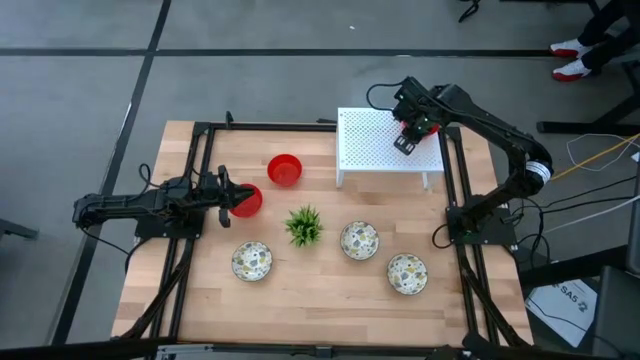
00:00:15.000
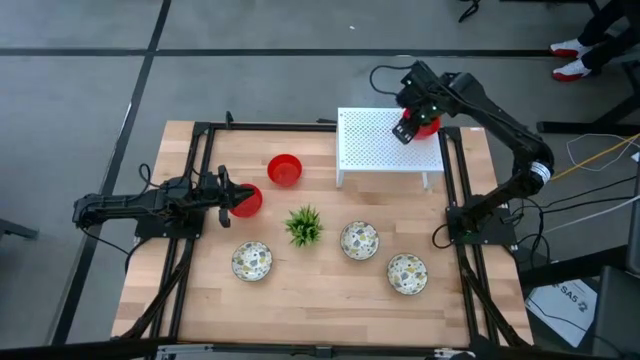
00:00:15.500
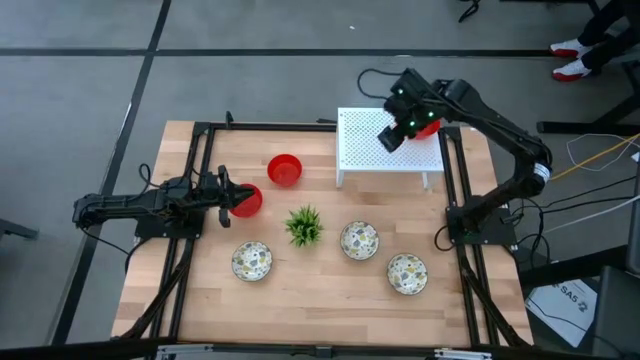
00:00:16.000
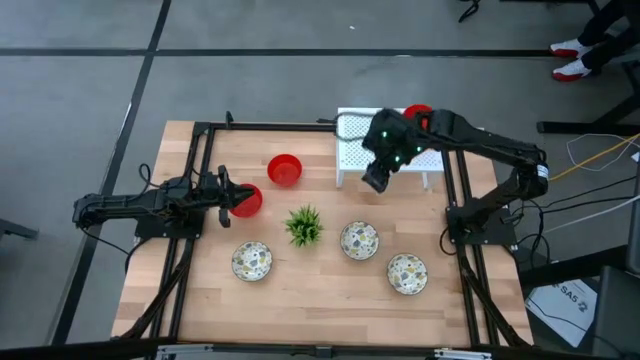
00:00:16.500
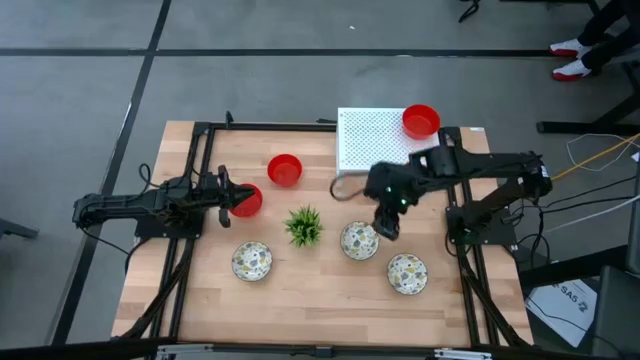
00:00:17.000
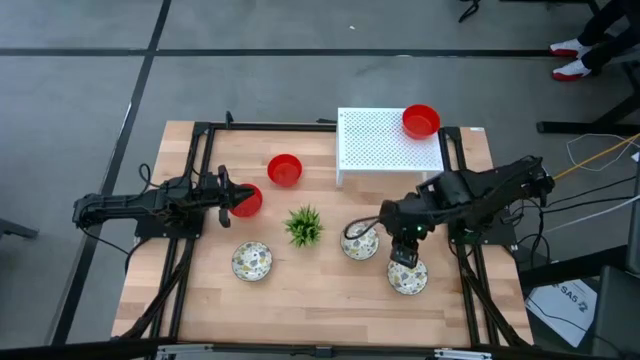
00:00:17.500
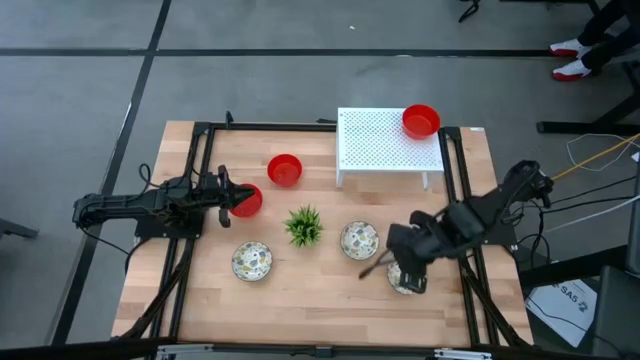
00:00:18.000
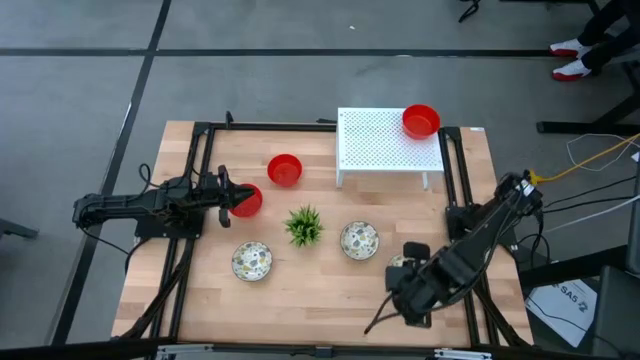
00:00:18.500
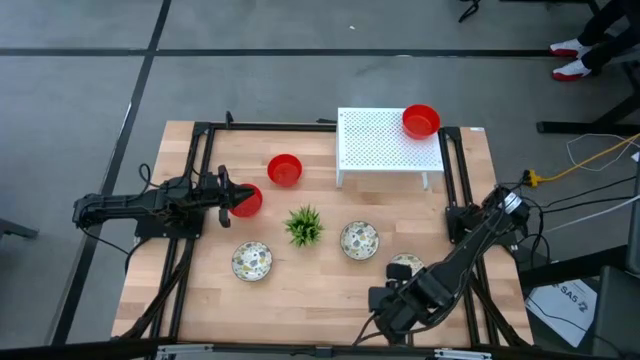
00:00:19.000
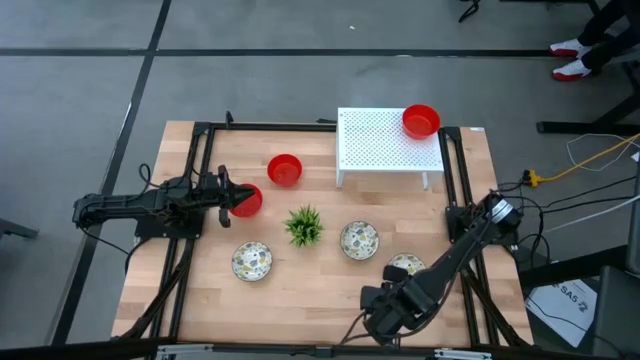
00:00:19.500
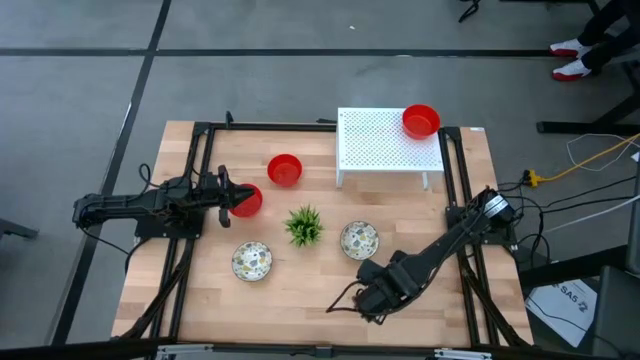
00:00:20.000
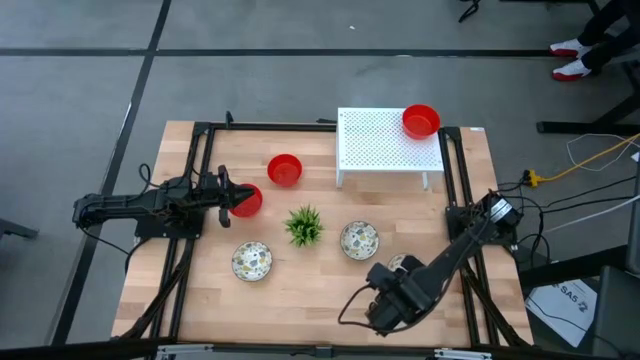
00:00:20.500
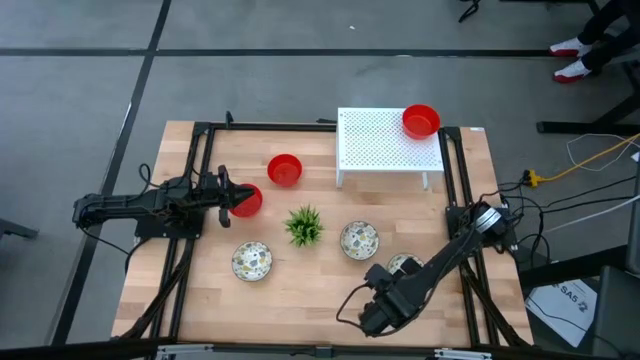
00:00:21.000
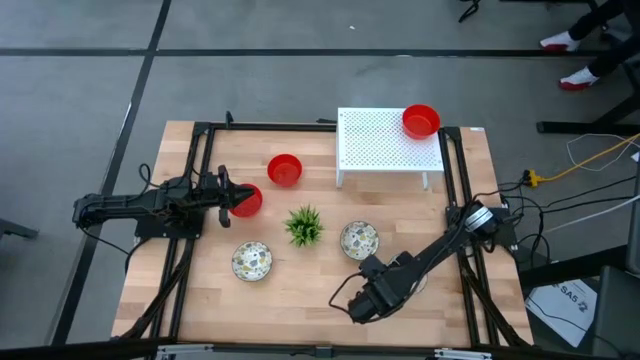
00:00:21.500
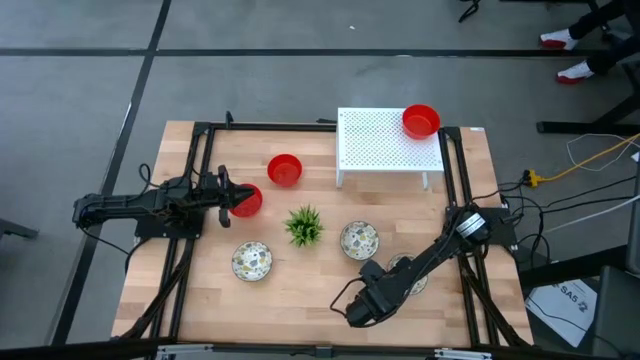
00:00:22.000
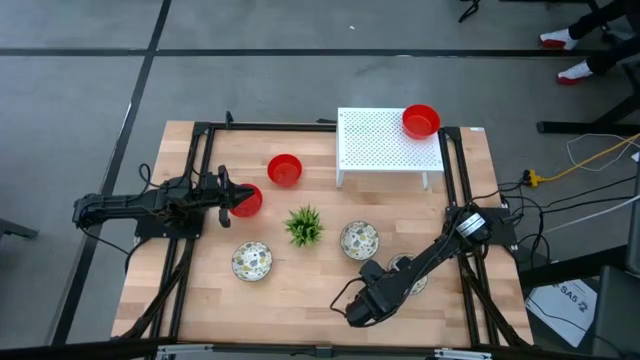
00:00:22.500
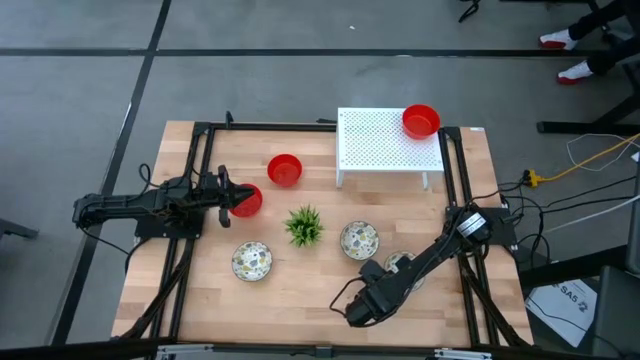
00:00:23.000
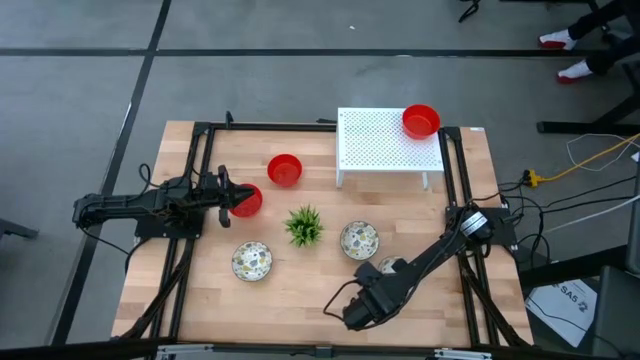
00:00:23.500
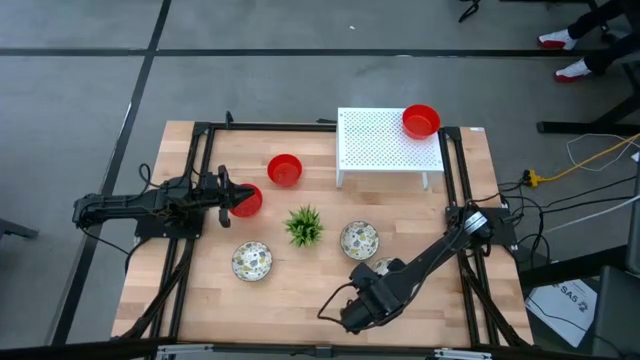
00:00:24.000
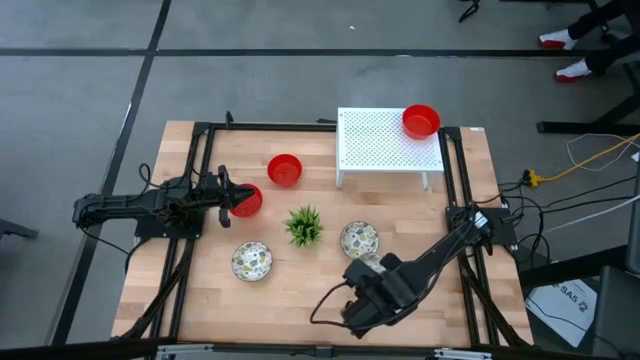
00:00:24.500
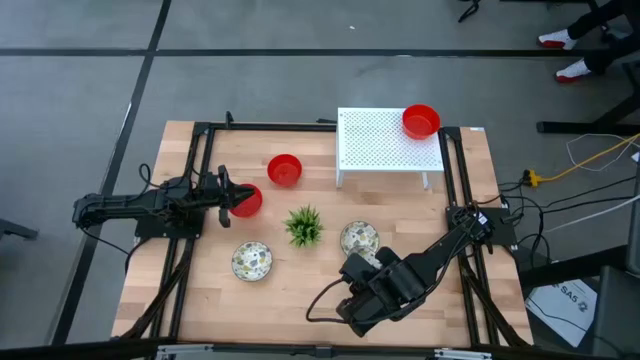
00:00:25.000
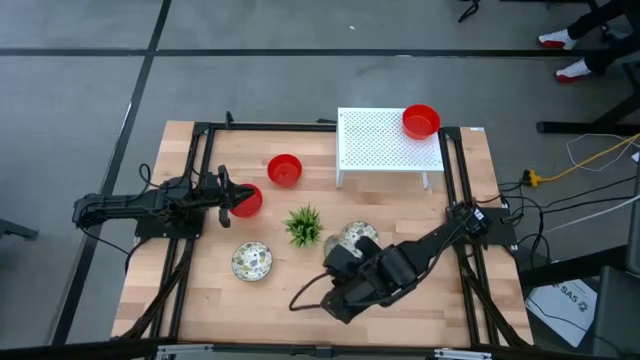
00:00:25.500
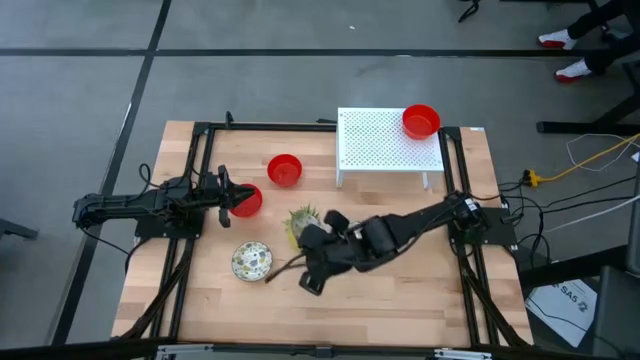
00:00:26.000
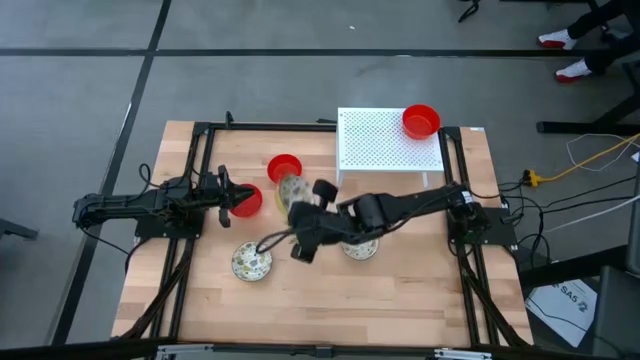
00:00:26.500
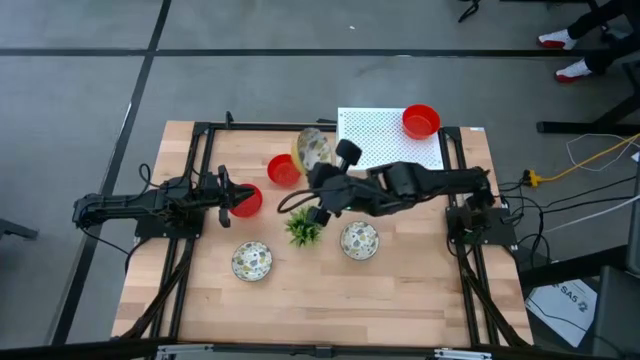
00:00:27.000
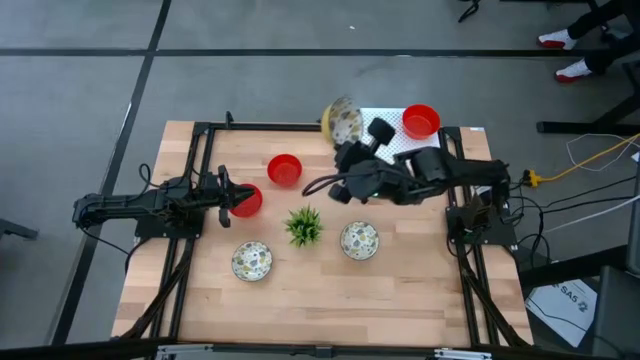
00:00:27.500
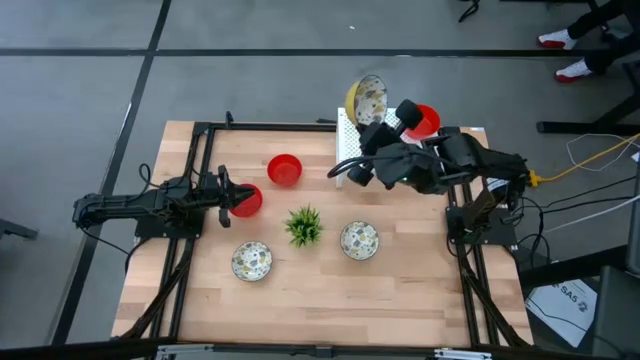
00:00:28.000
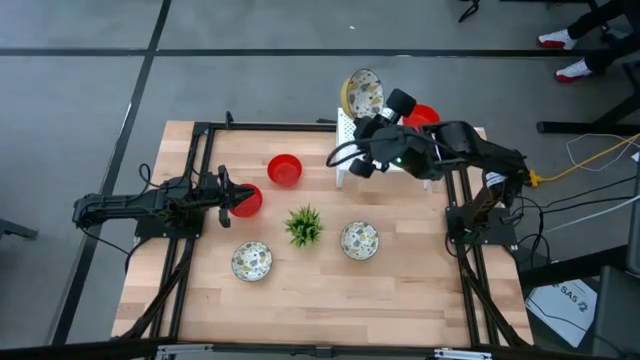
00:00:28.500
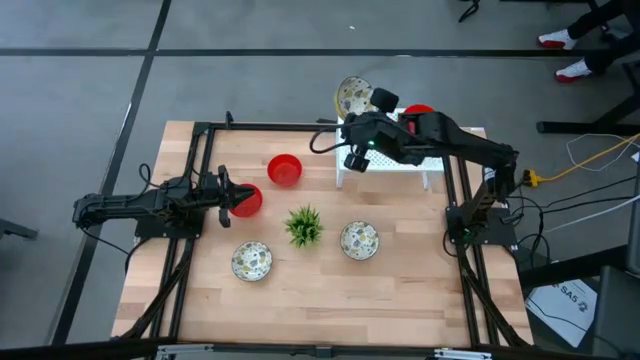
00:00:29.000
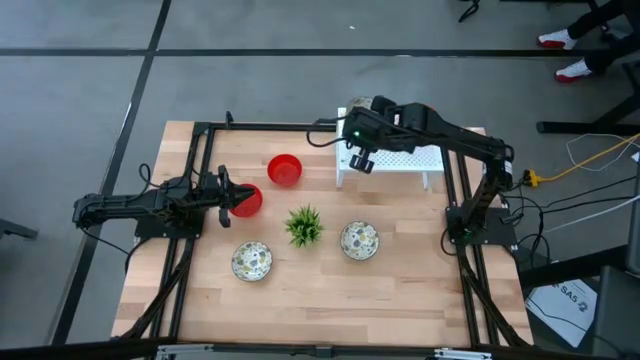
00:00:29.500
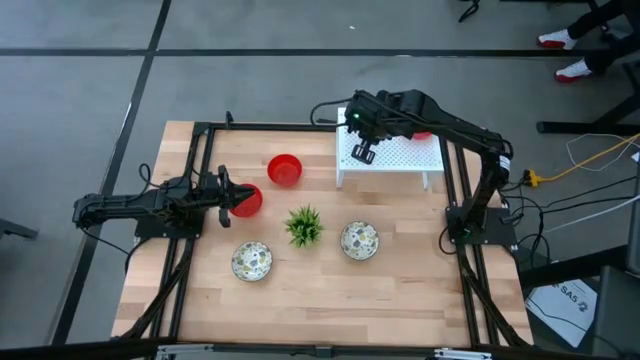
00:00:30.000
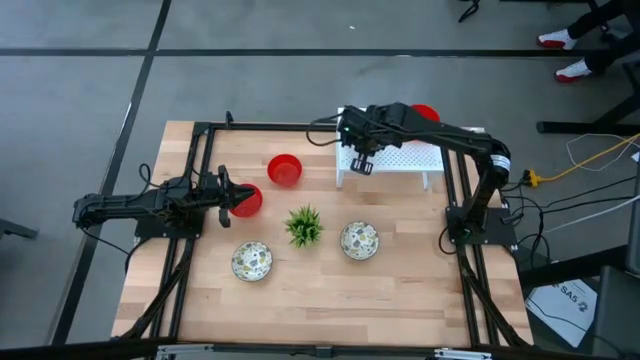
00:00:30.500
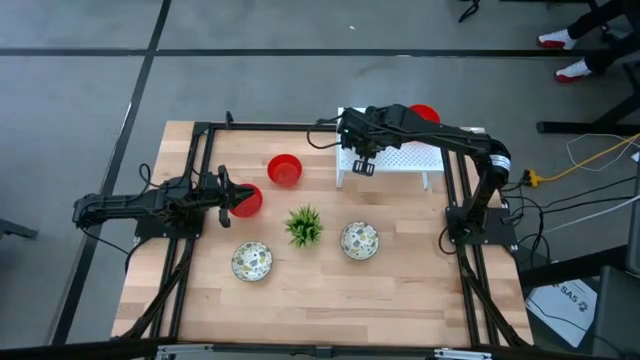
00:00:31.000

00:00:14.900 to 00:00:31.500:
Task: Pick & Place Mini bowls
Put the bottom right white bowl on the shelf

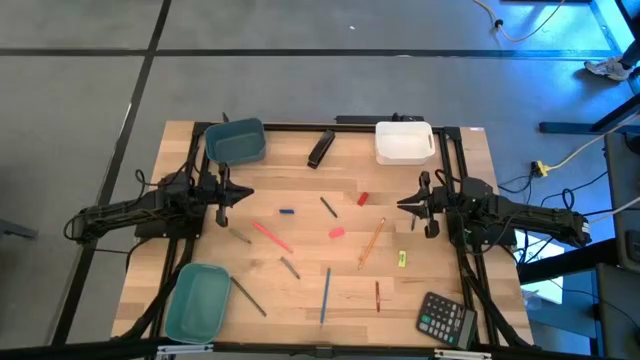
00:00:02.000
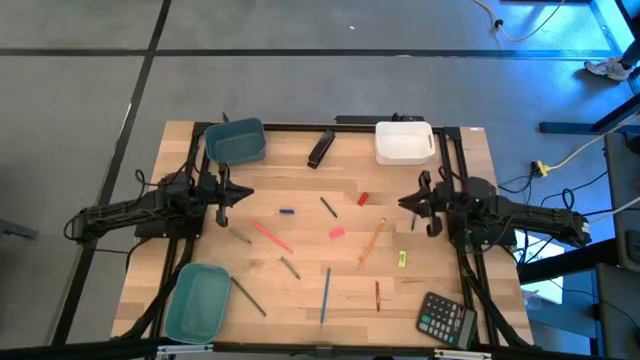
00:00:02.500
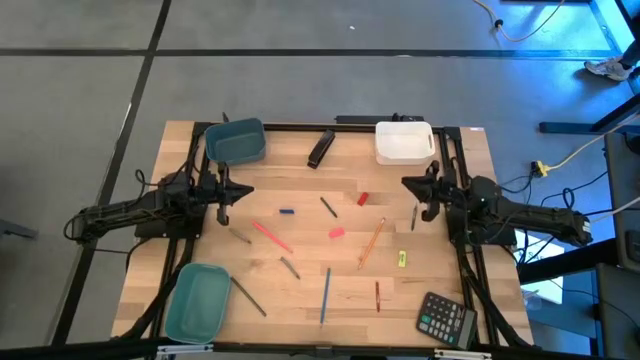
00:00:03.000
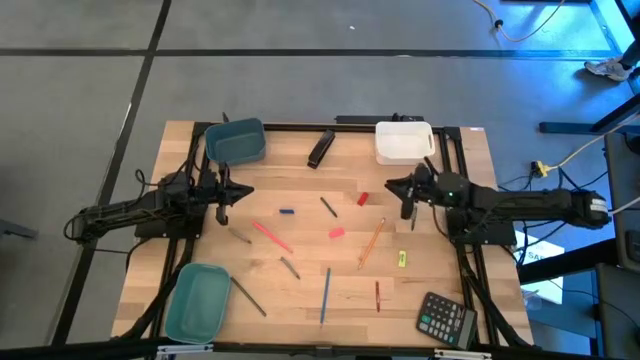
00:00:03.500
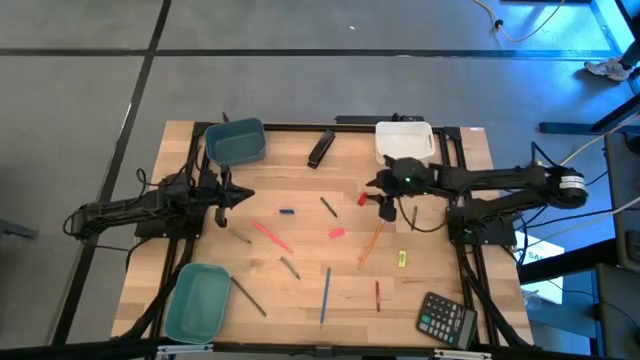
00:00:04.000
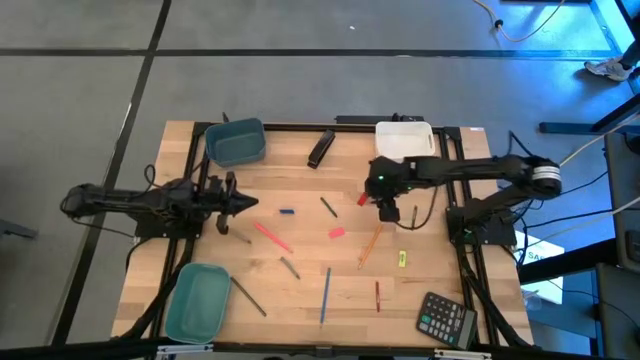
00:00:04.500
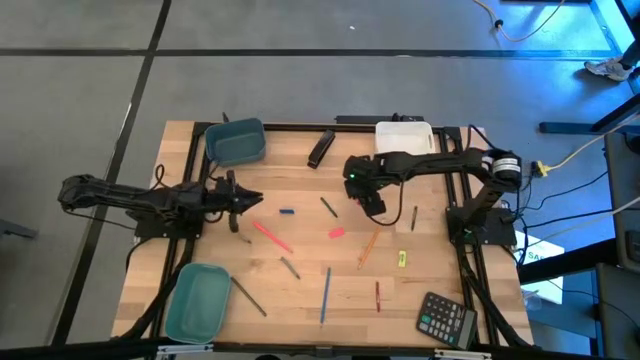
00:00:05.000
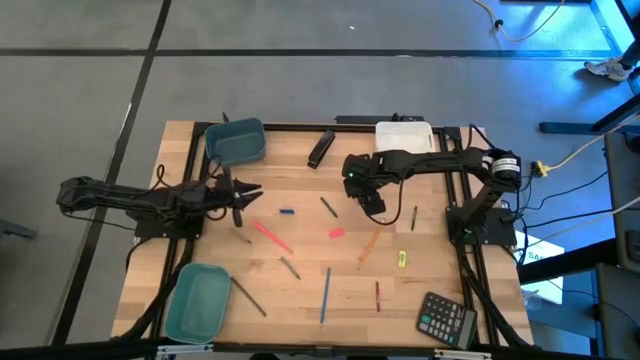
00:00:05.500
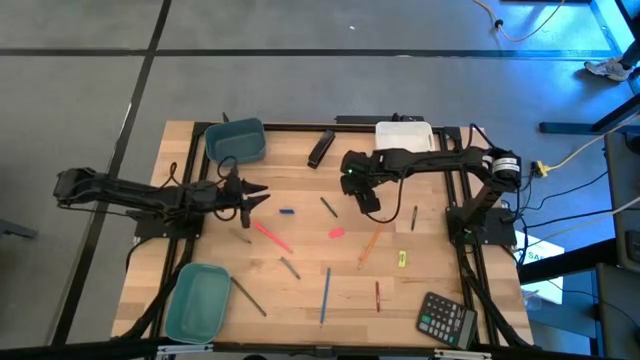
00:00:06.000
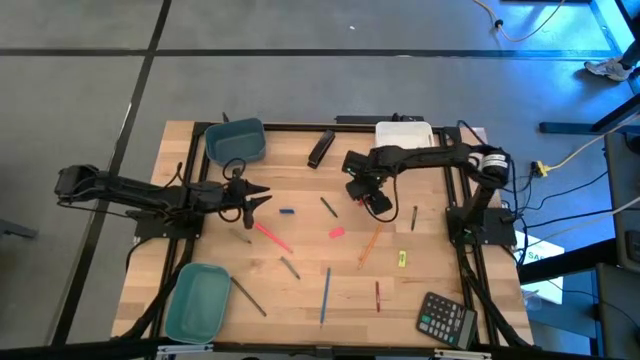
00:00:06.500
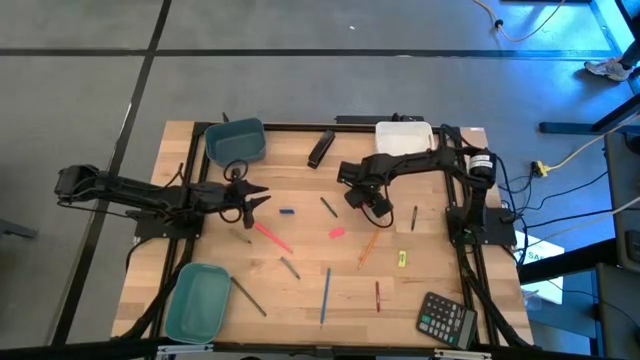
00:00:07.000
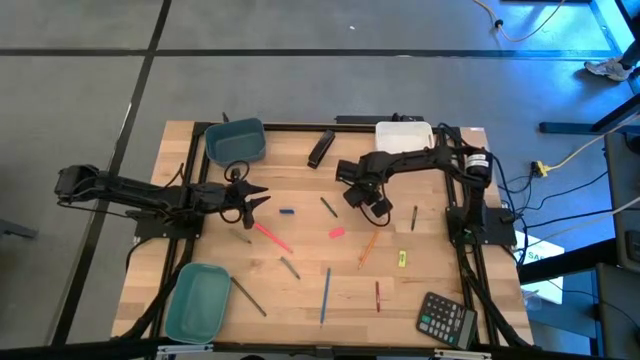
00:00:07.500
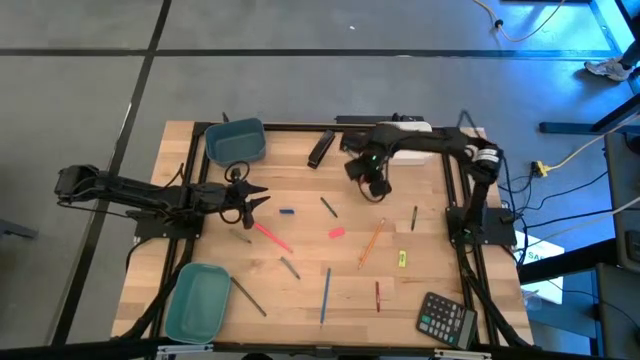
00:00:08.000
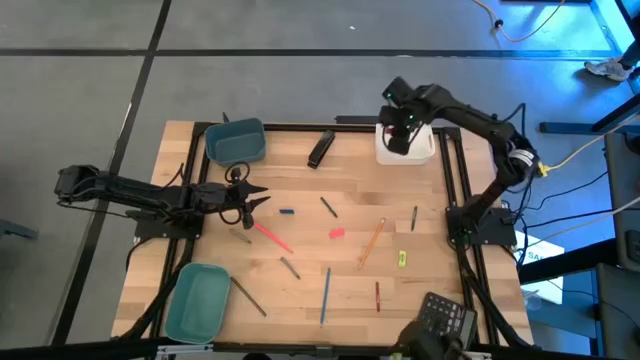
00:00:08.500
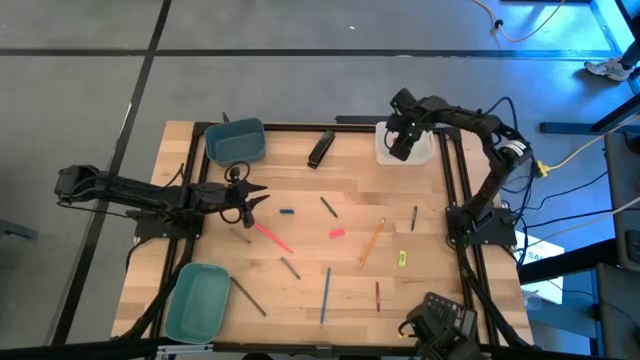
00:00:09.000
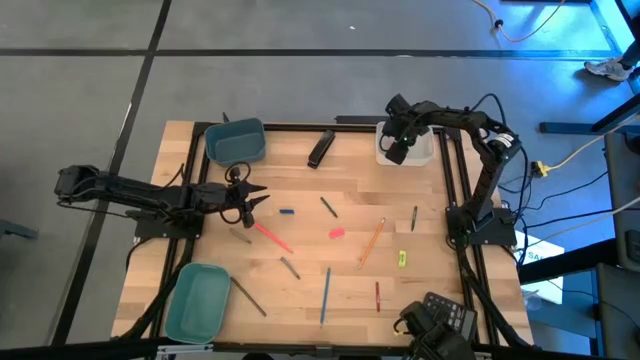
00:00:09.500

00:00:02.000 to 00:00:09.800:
Task: Sort crayons/erasers/pens/pencils in bins
Put the red eraser into the white bin
